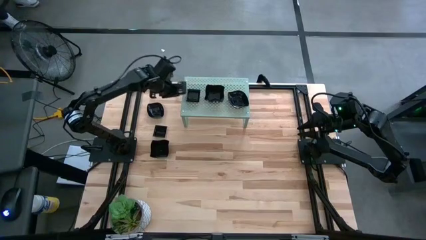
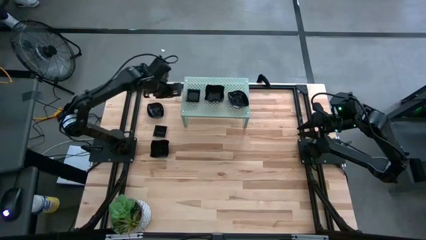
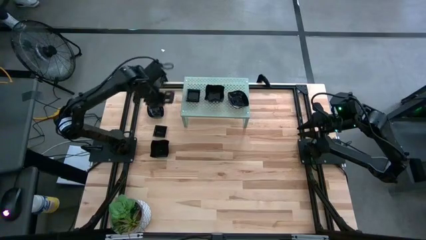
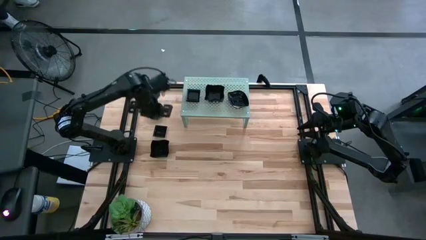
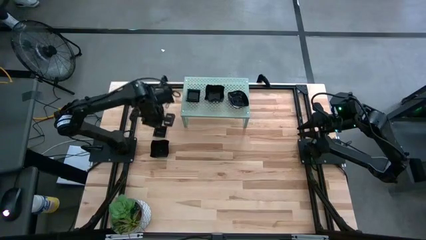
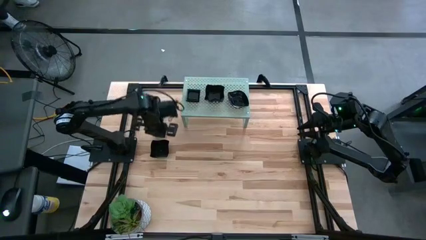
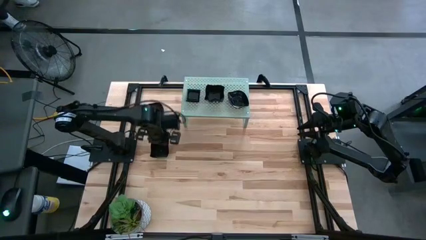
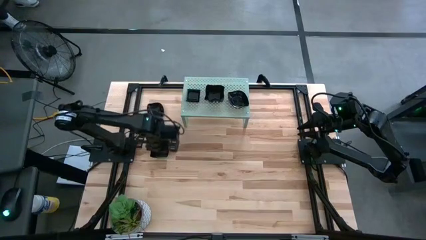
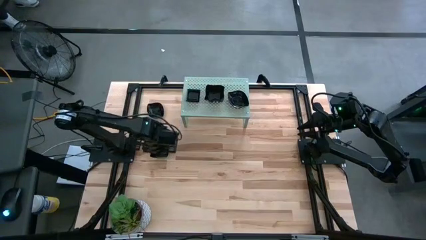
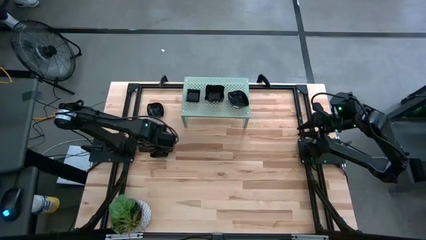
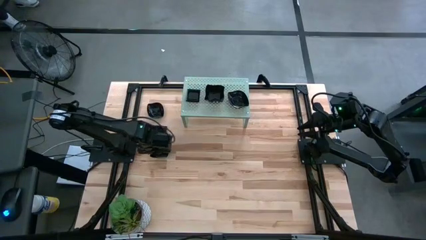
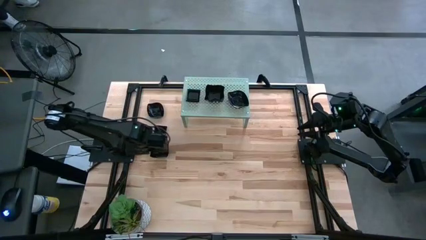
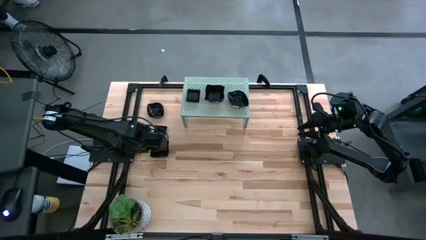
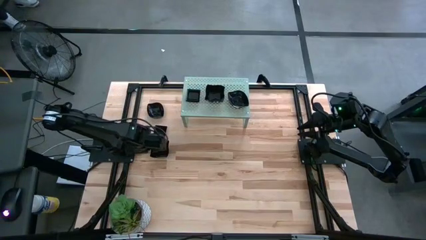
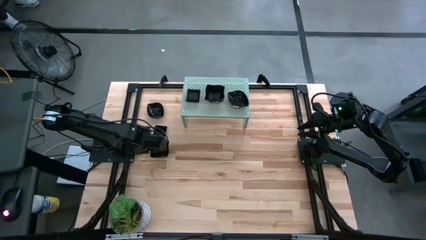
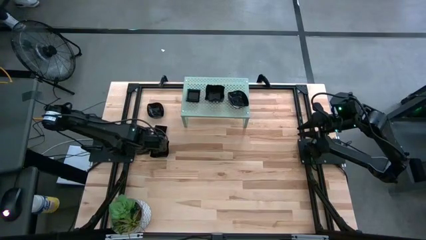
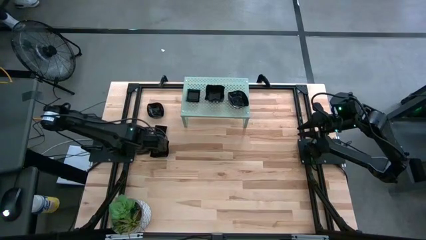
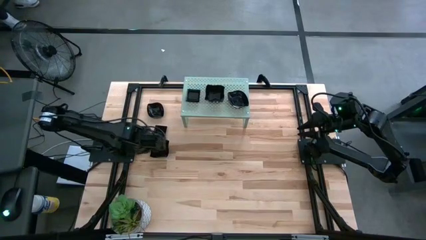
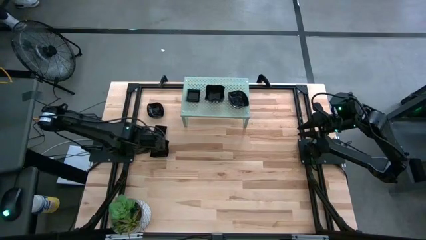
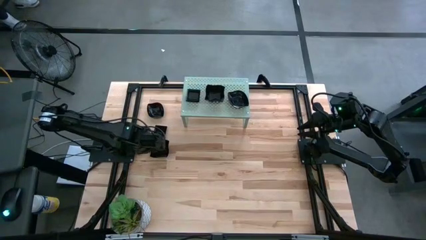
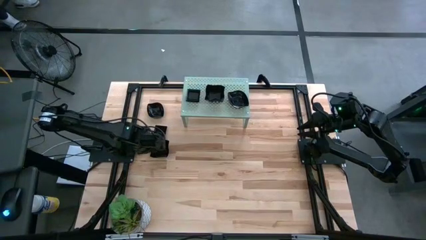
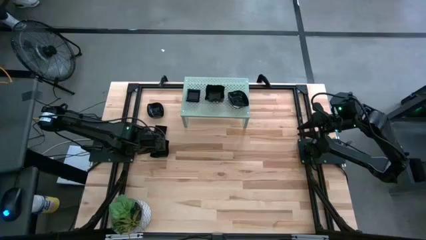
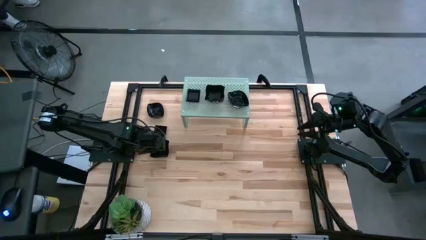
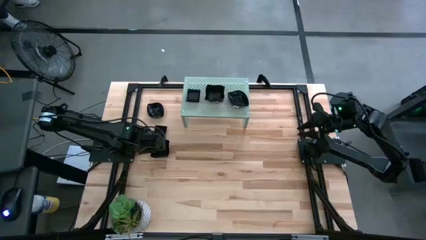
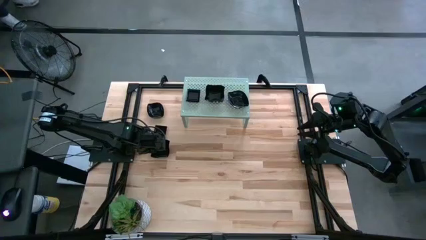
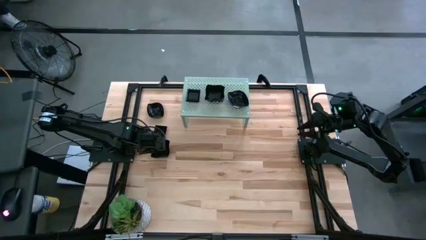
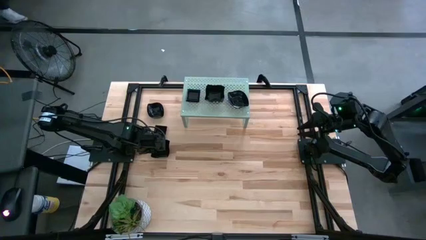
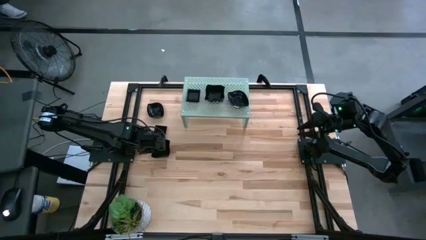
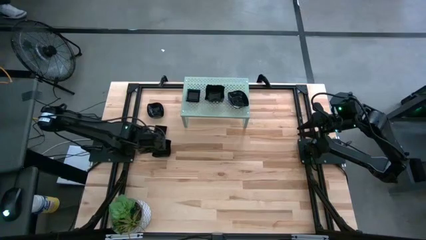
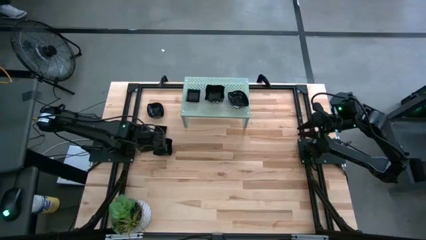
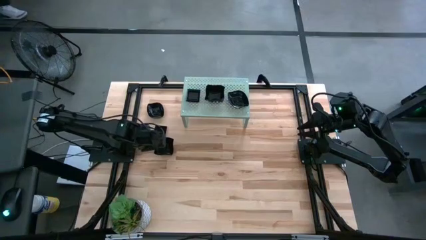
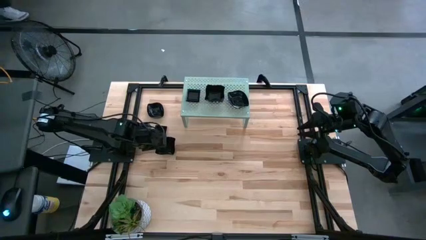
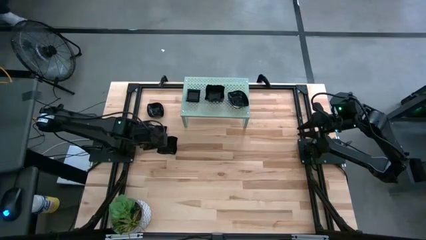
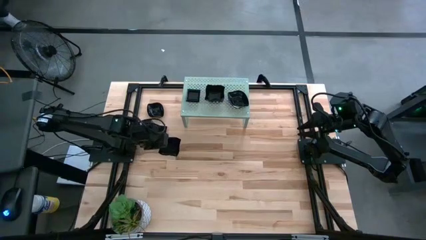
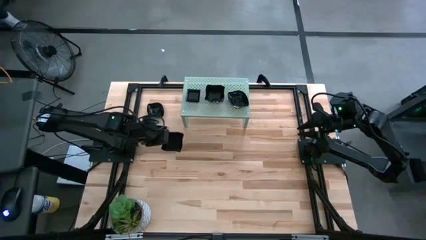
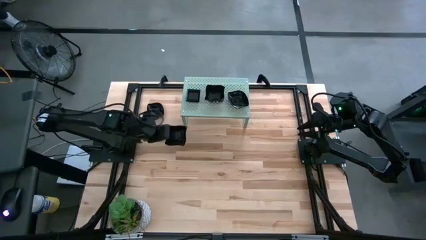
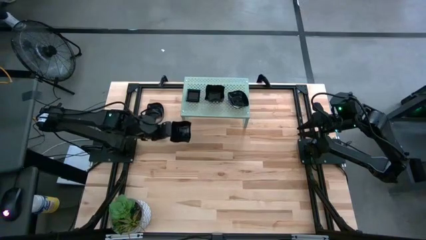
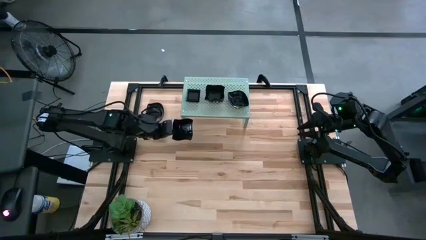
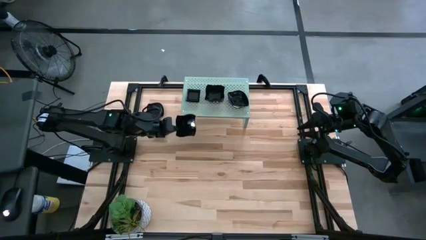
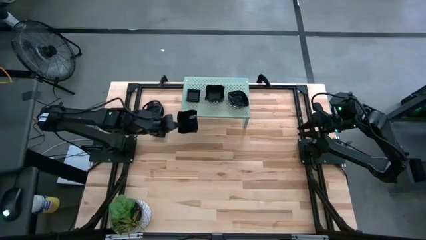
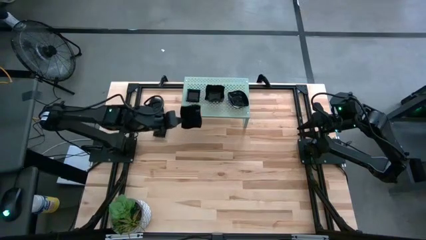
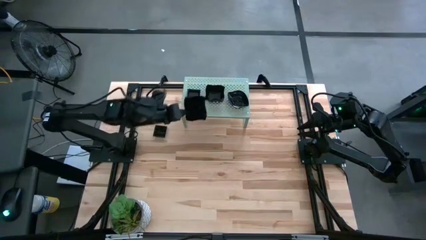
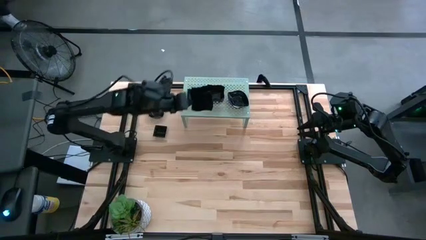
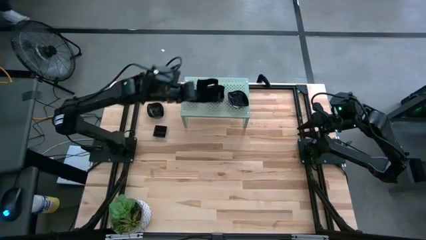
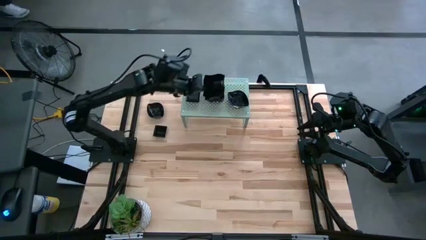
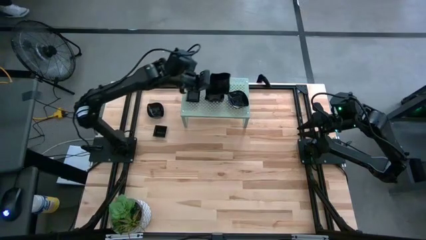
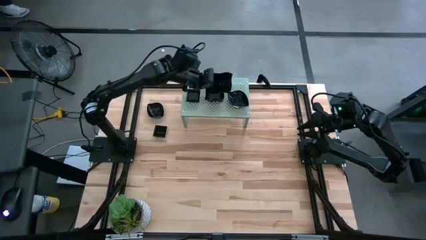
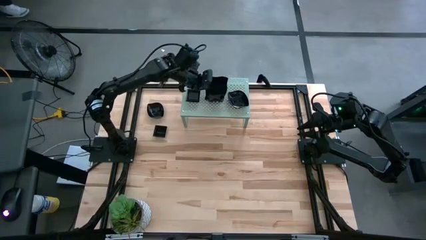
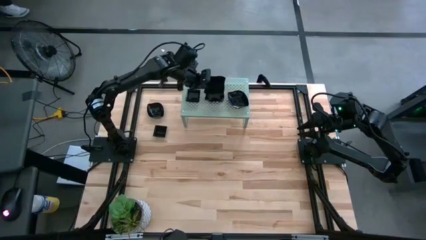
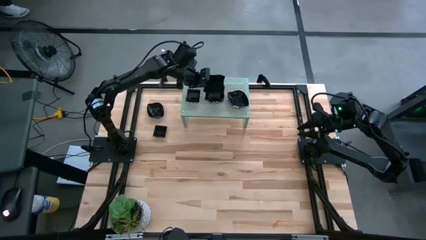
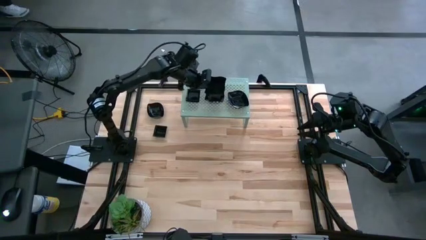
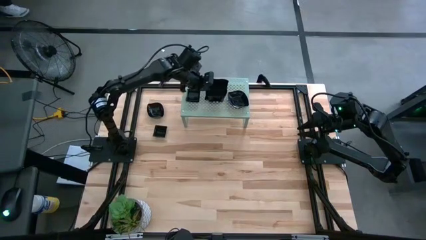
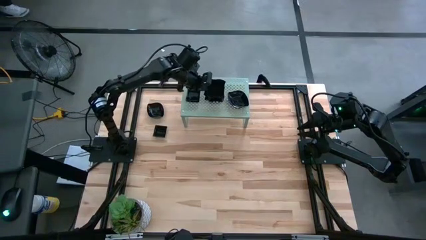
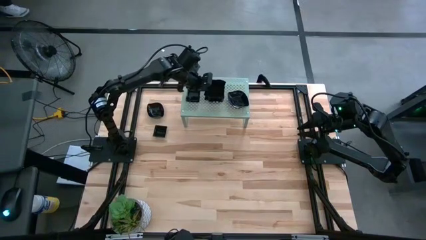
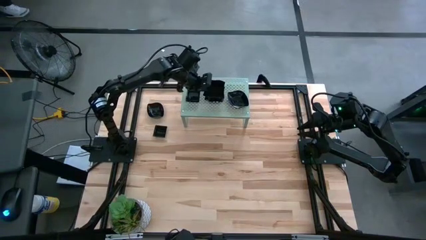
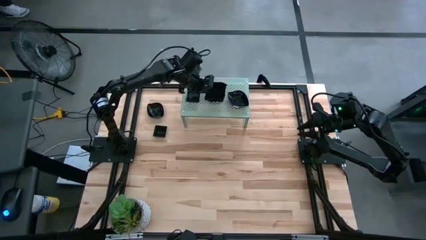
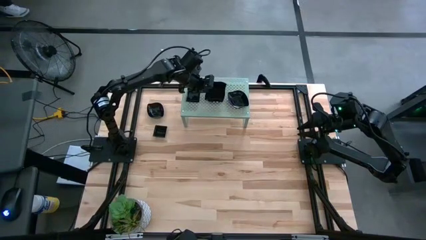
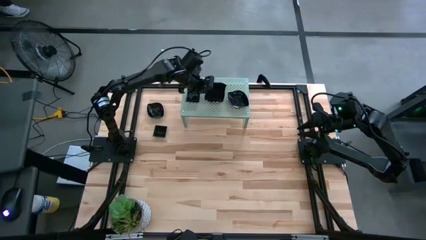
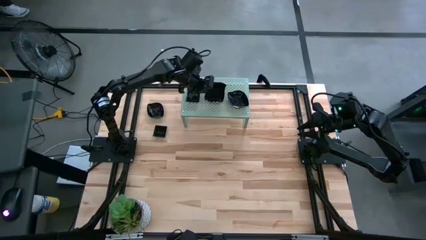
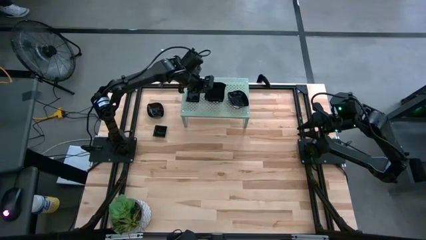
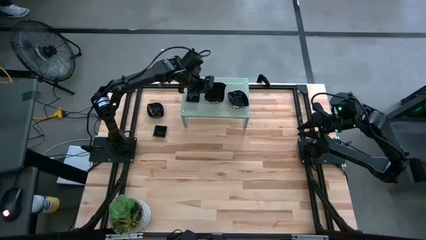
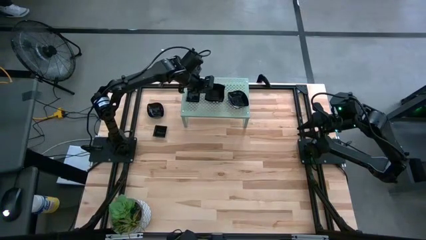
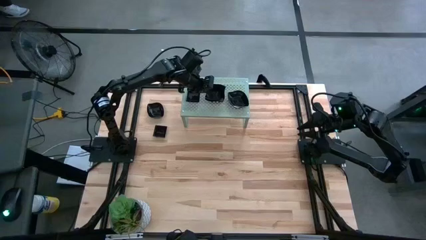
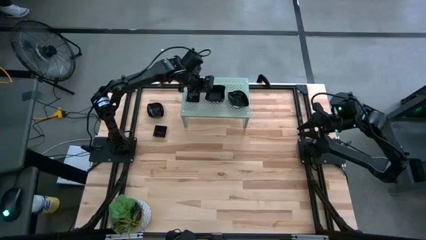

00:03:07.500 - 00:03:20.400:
Task: Pick & Place Mini shaped plates
Stack the wave square shaped plate on top of the wave square shaped plate on the shelf
